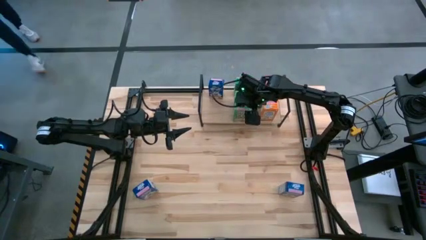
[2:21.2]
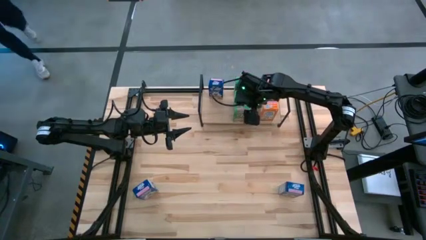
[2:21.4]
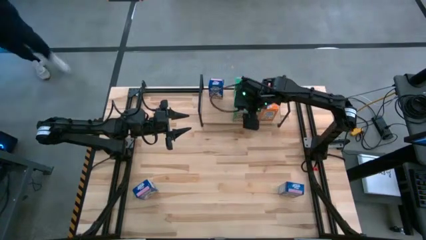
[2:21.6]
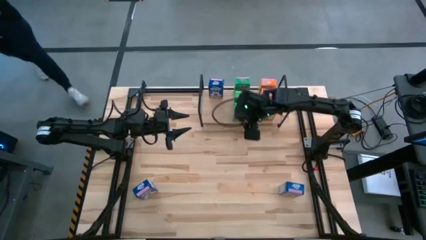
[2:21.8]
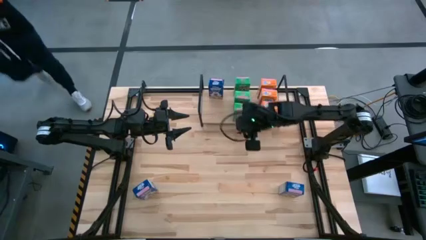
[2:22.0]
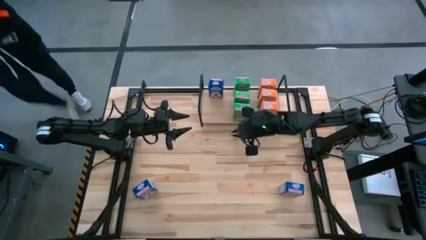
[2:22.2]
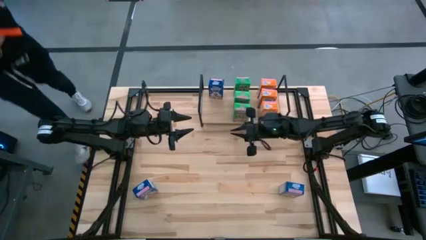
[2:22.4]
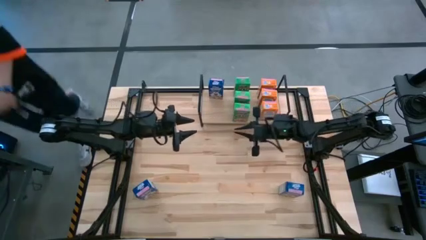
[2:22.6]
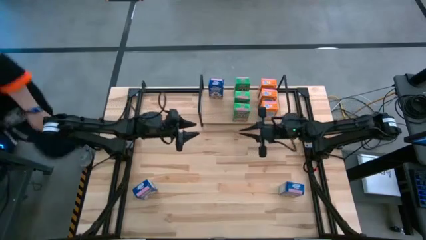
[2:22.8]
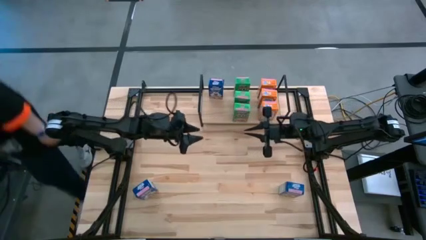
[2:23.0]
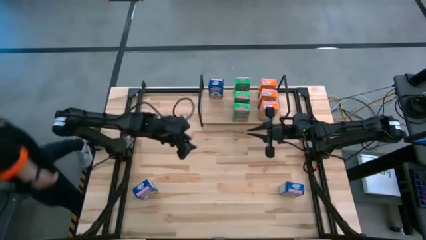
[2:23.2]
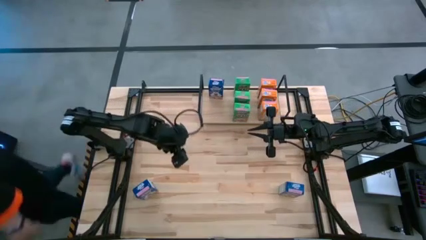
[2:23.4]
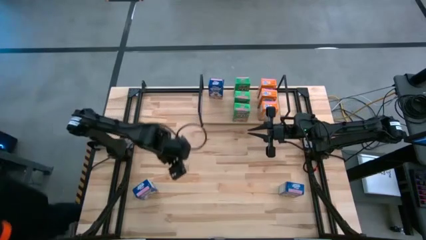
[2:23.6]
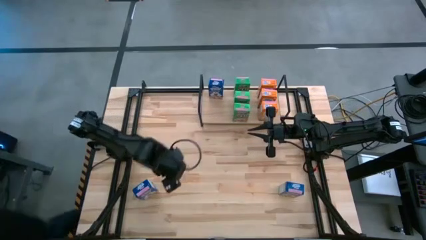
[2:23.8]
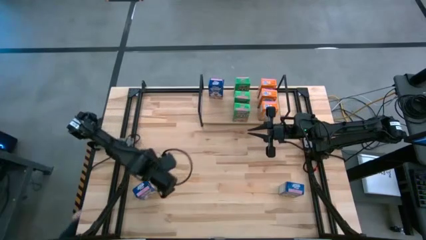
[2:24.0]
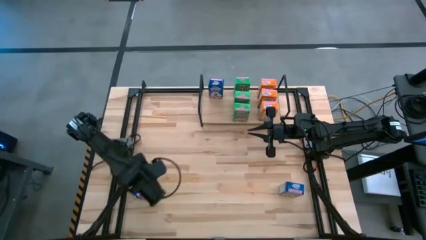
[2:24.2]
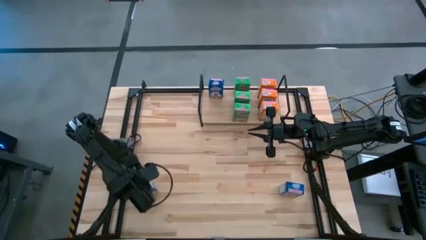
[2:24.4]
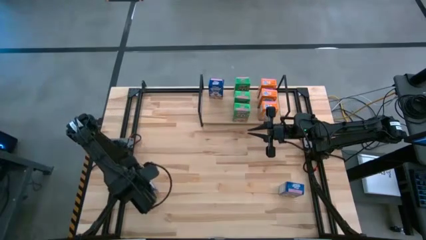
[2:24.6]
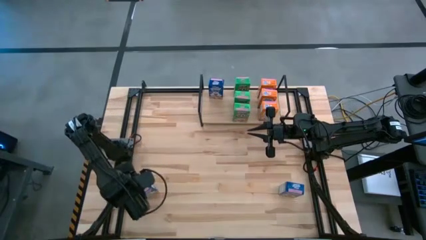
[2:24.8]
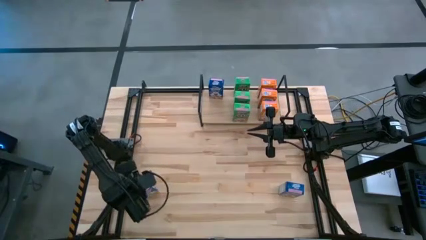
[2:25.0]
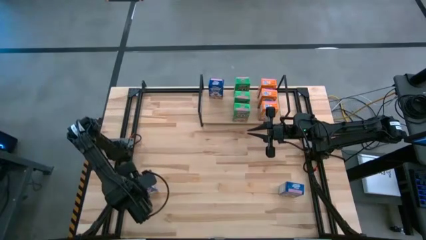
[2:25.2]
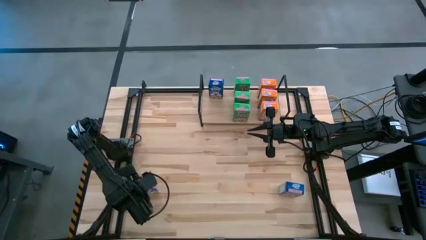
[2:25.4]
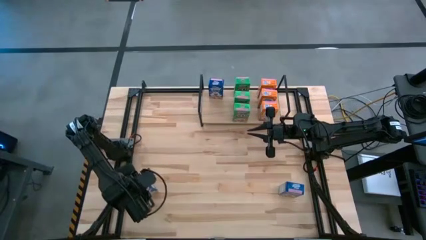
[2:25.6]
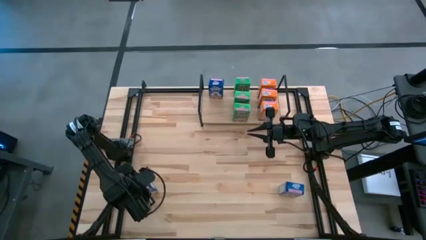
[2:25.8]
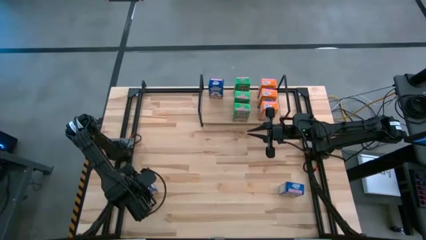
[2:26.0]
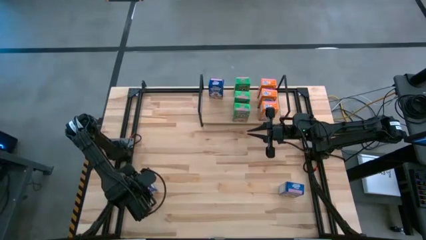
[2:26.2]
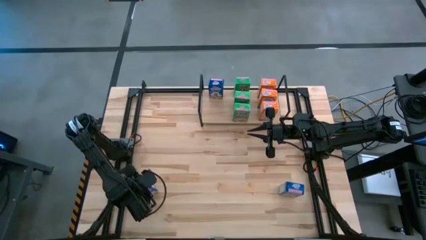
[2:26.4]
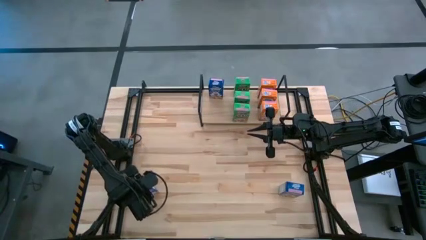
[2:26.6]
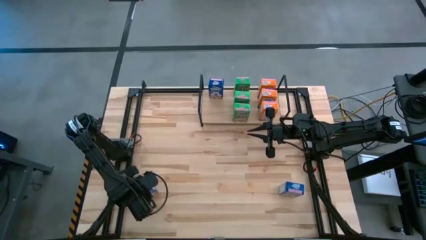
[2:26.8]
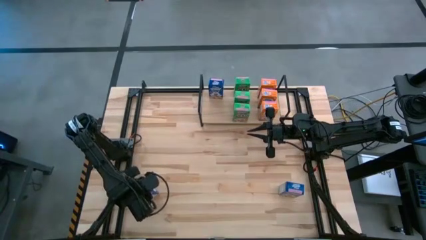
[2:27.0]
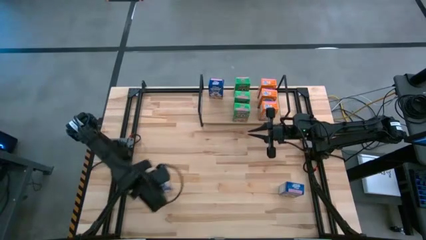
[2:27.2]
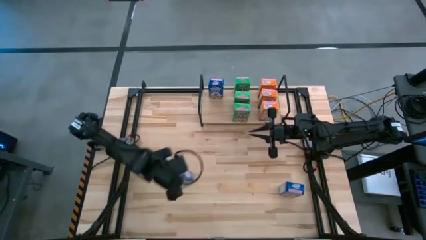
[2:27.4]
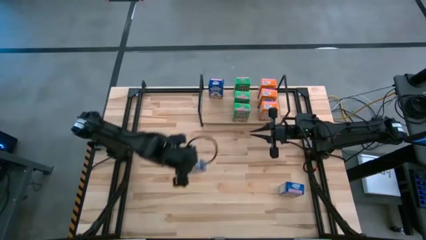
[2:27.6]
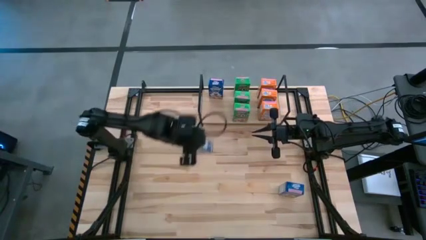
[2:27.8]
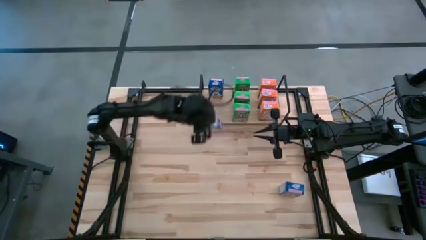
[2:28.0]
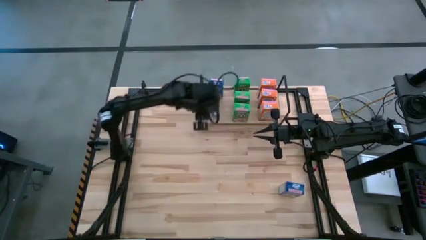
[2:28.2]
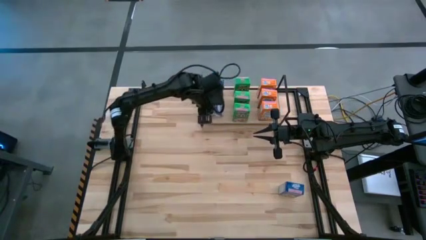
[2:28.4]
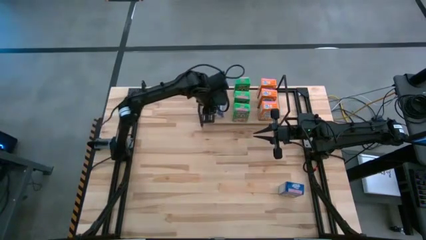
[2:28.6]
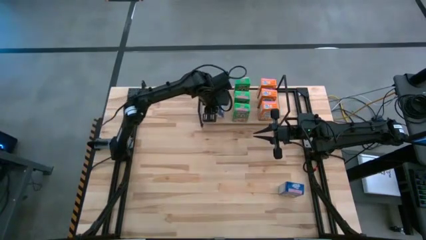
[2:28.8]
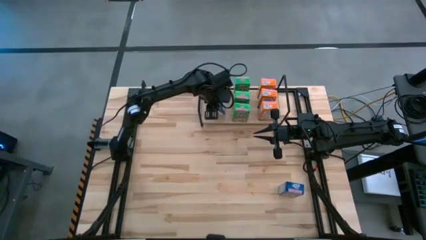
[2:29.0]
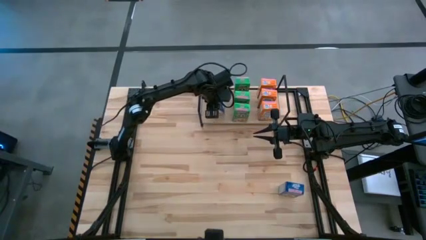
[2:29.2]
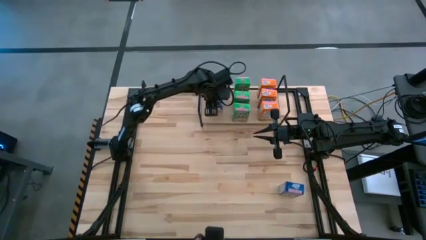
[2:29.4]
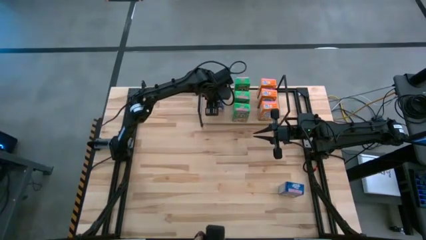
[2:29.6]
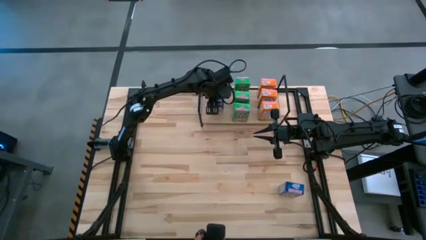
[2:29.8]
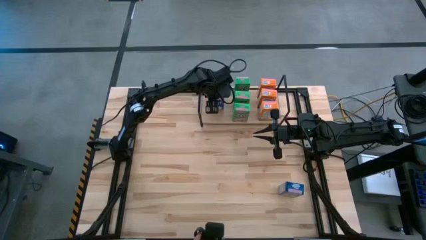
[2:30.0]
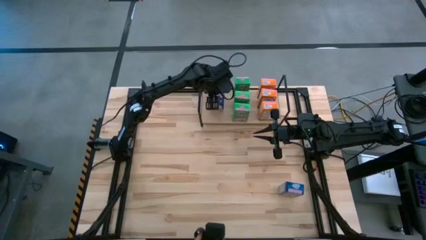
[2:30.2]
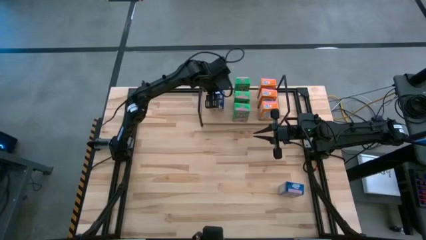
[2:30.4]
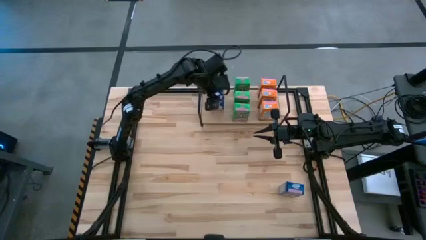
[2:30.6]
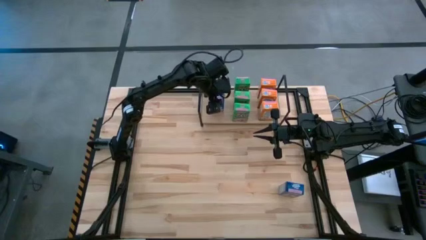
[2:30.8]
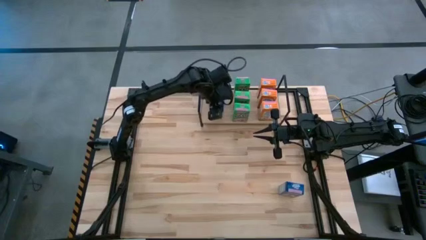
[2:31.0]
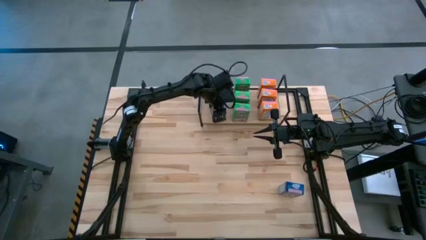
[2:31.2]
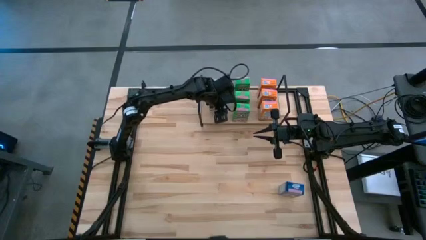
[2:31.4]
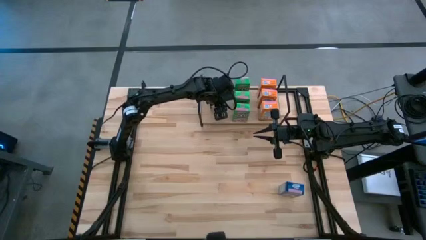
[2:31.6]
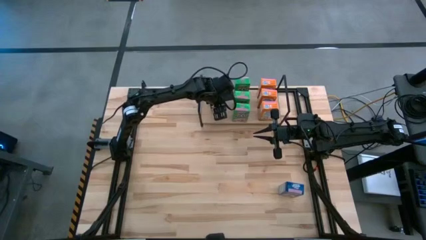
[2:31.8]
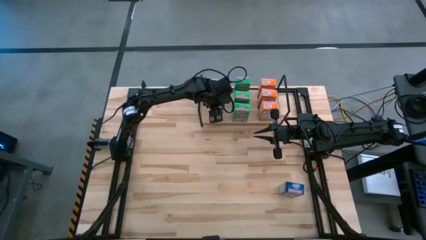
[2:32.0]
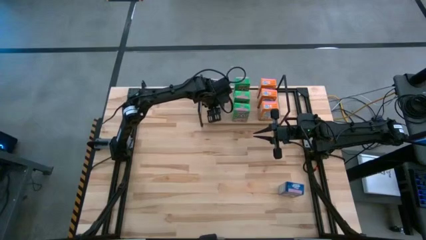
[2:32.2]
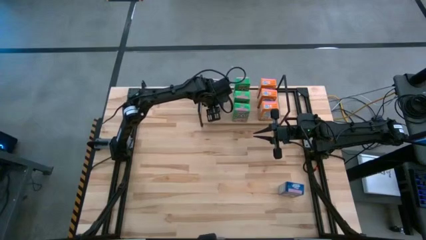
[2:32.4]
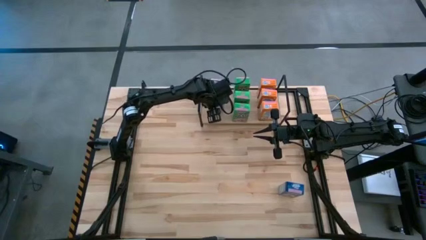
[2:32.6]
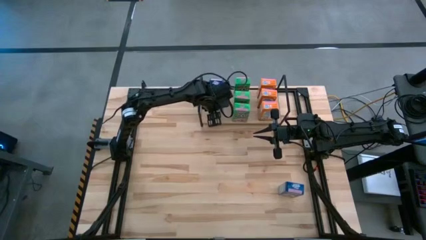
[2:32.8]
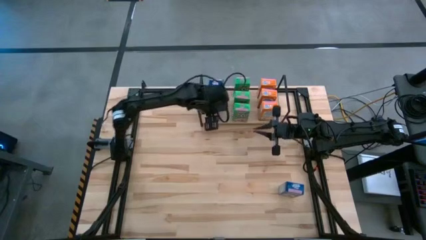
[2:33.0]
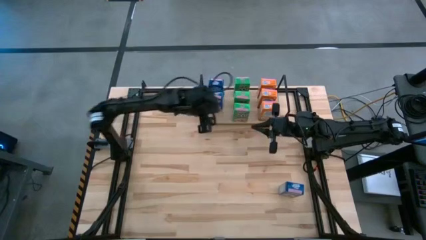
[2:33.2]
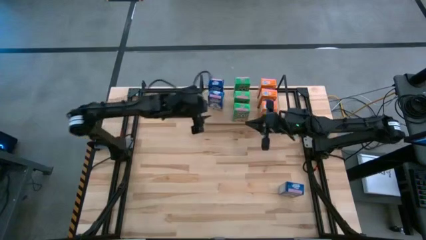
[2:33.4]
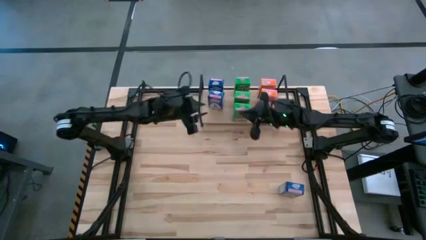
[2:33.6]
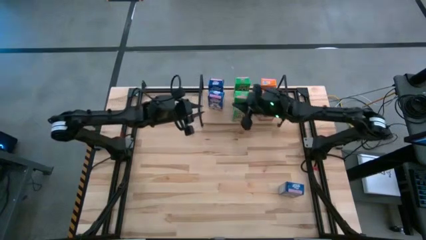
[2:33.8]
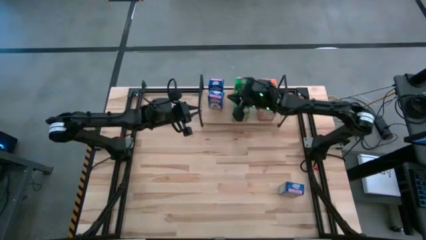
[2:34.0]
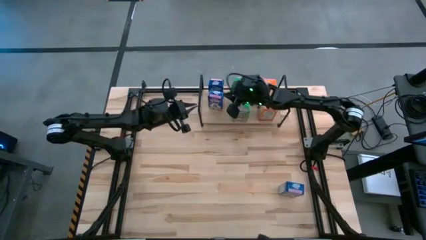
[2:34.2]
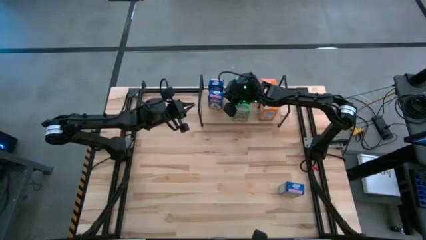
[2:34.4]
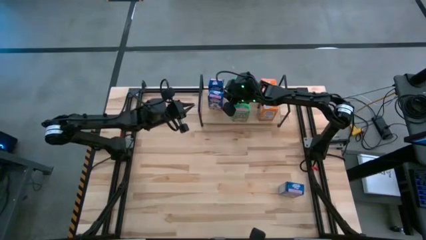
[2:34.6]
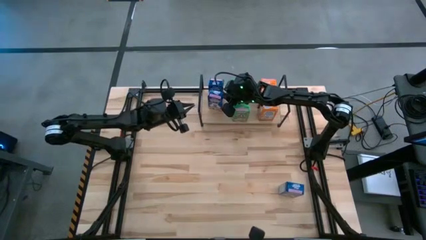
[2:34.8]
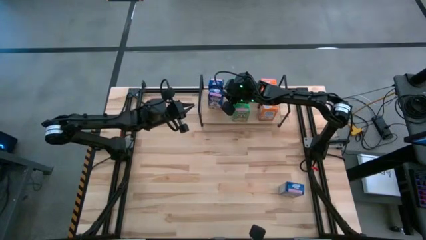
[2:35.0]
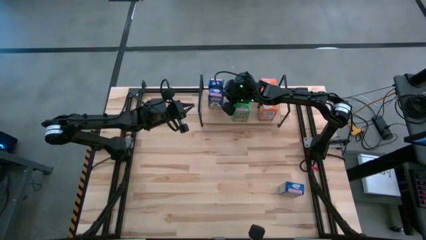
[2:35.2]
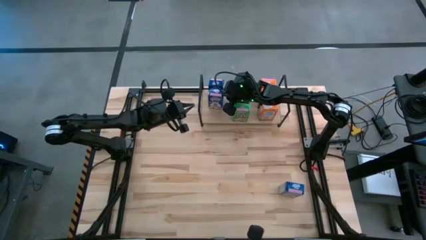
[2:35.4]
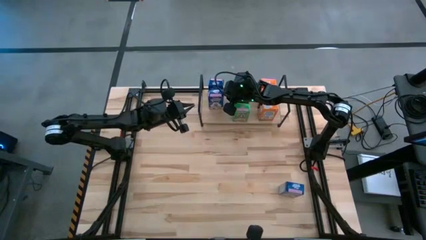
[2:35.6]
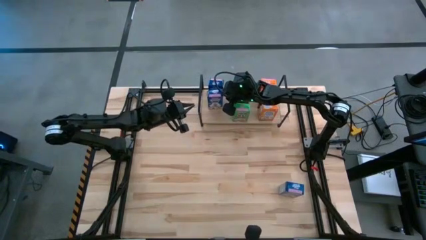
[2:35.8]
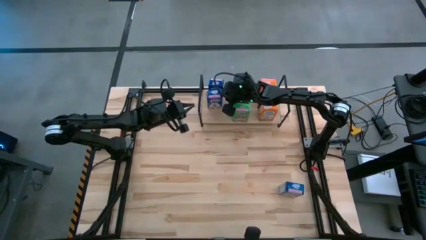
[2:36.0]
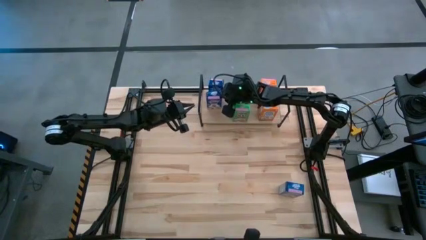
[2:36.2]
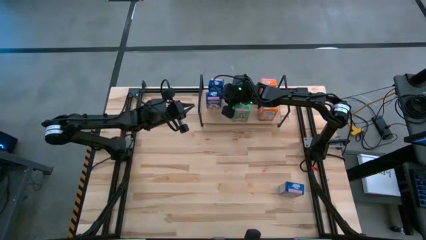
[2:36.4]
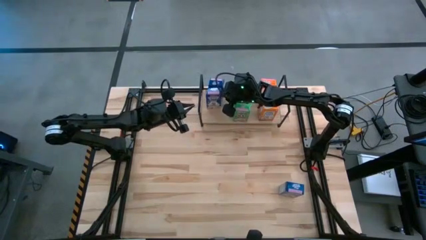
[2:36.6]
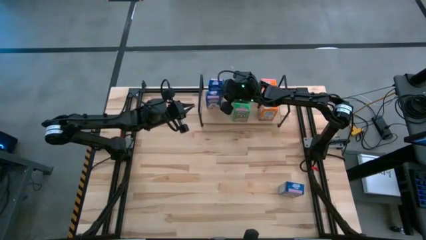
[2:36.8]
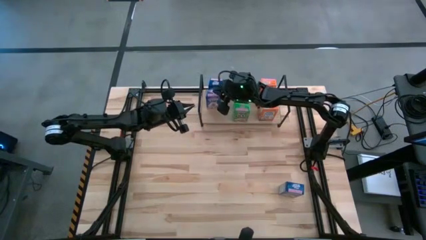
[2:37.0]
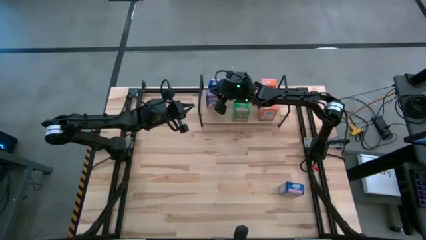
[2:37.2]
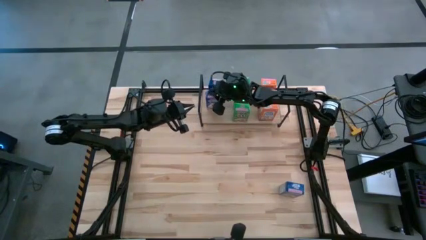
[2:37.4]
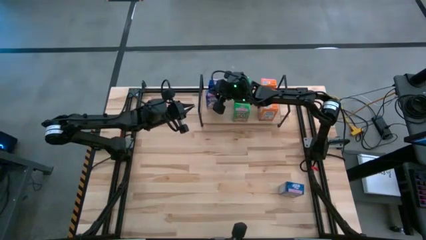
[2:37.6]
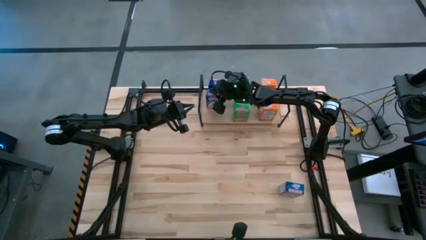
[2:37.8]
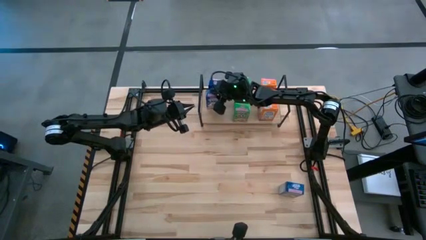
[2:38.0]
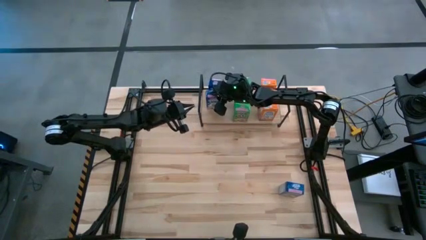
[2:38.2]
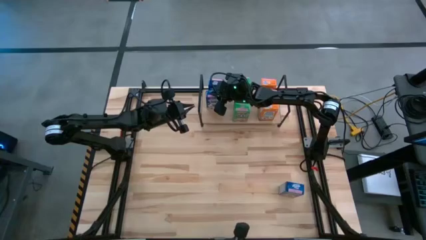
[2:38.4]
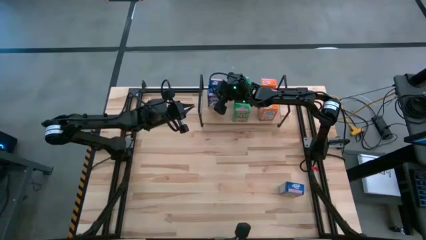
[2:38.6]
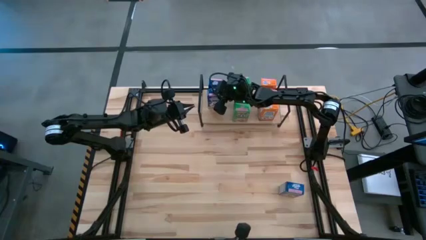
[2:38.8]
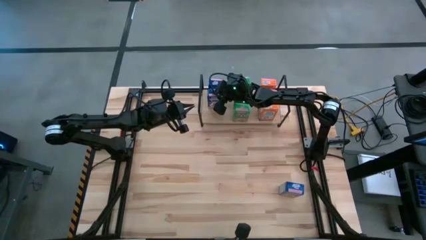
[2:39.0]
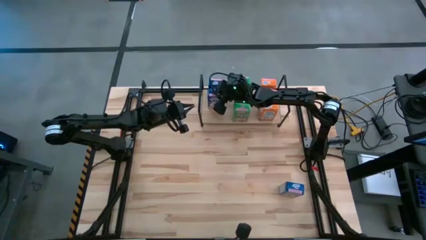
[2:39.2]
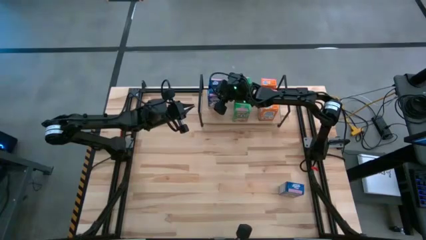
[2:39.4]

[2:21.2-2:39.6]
Task: Stack cereal on shelf
Put the left blue cereal box aligned with the other blue cereal box on the shelf
